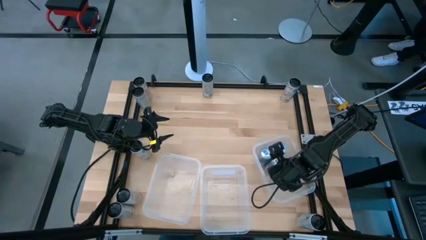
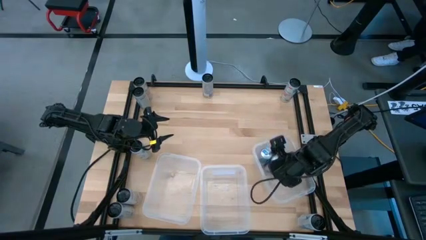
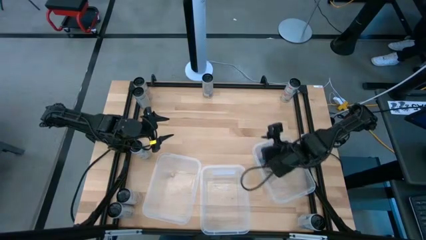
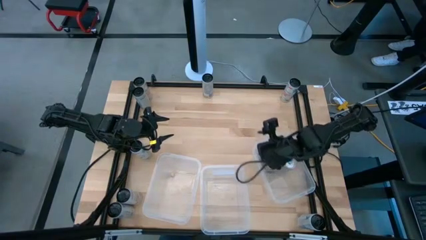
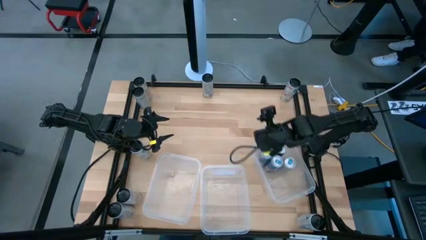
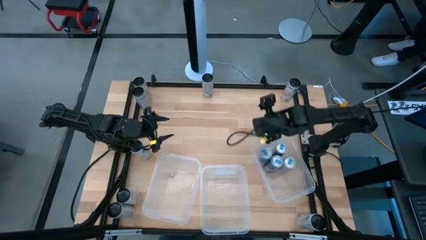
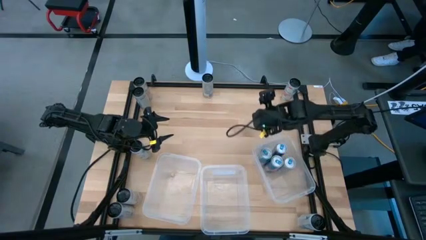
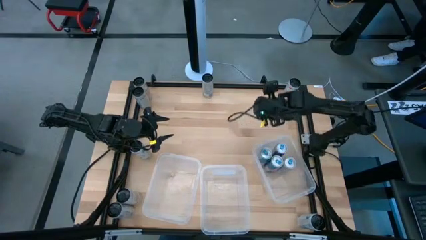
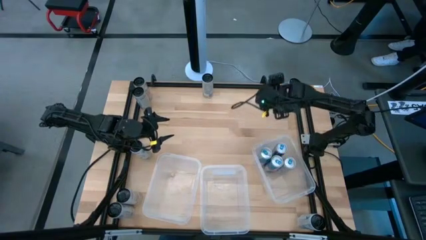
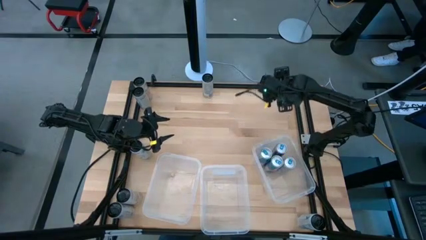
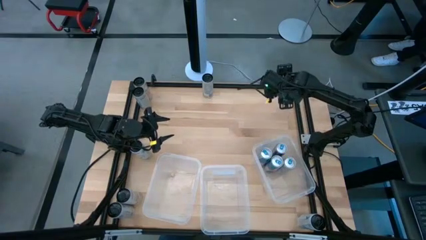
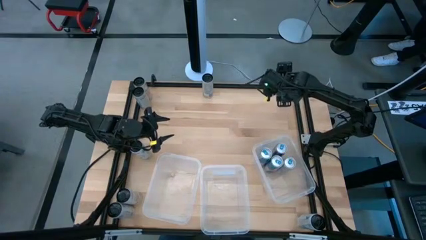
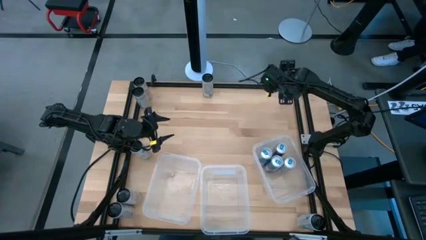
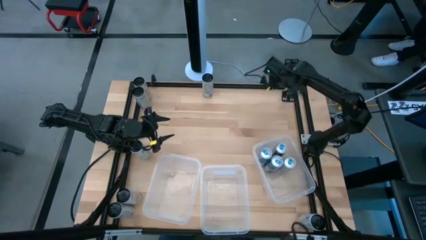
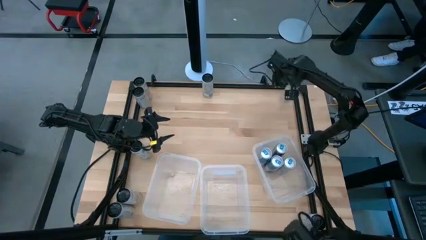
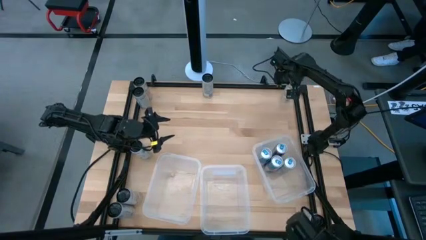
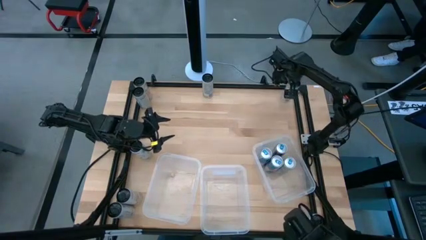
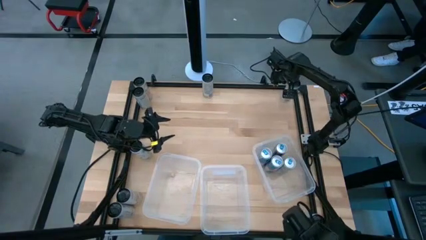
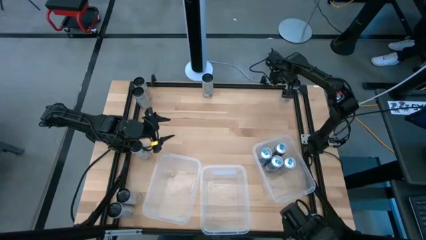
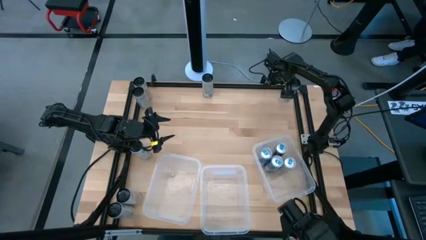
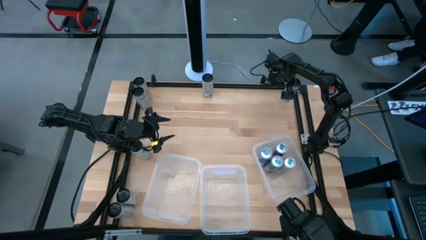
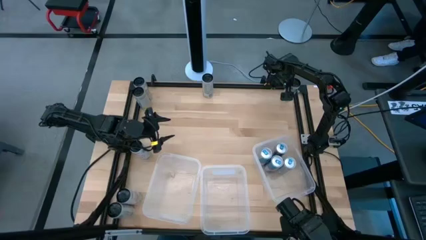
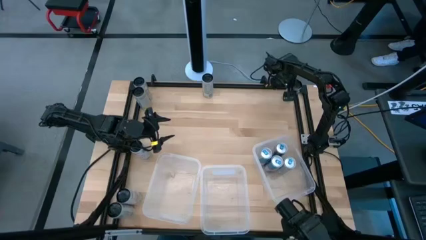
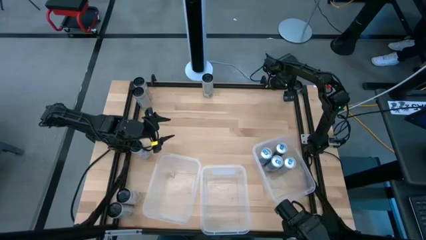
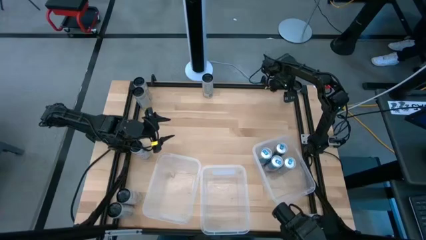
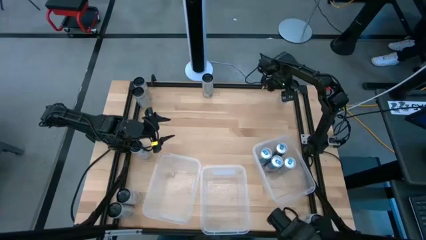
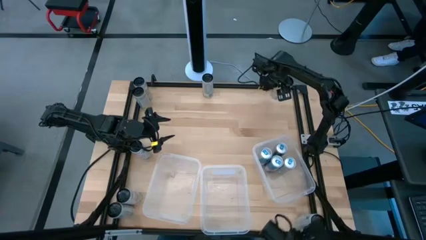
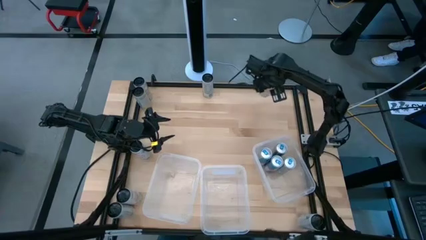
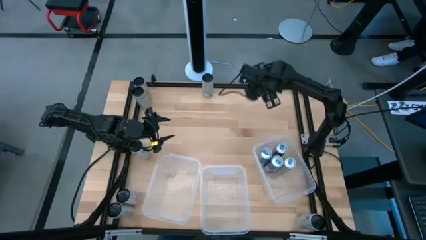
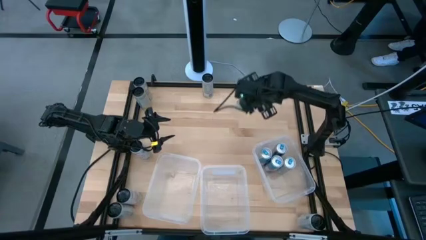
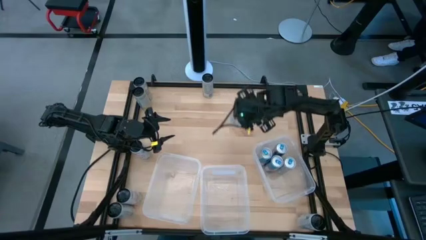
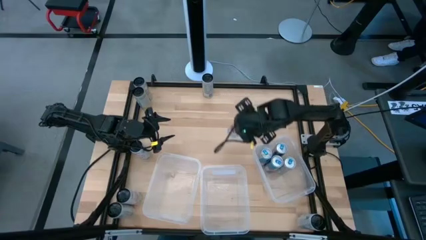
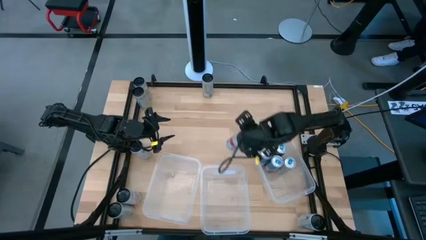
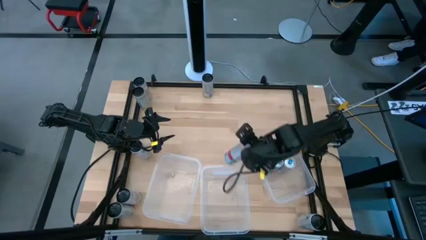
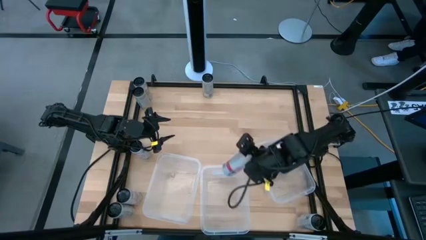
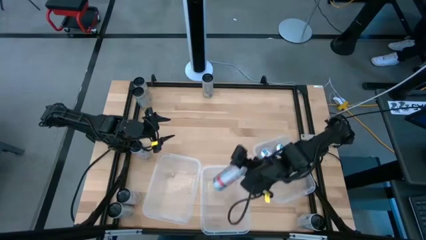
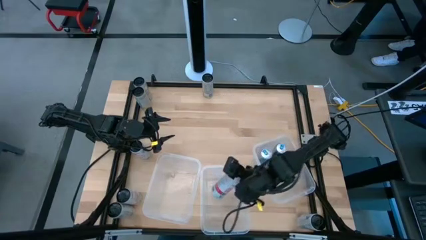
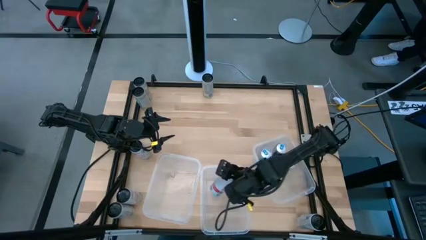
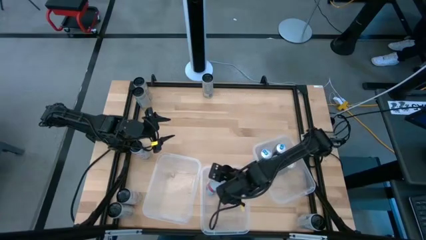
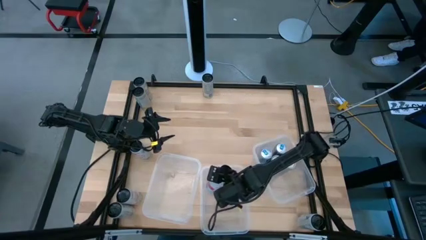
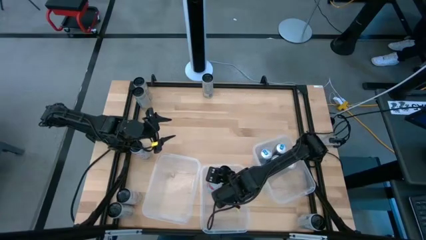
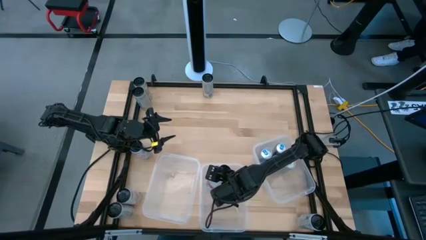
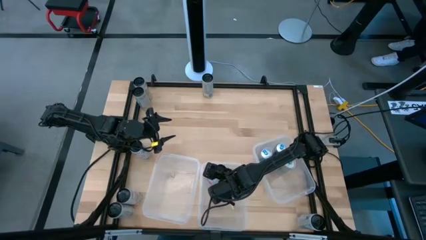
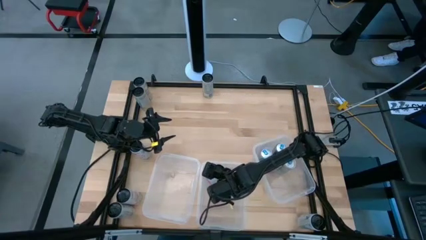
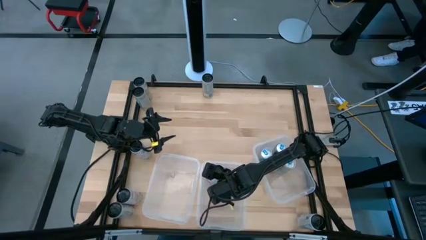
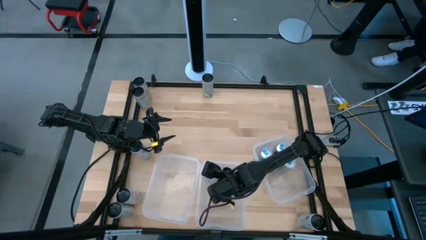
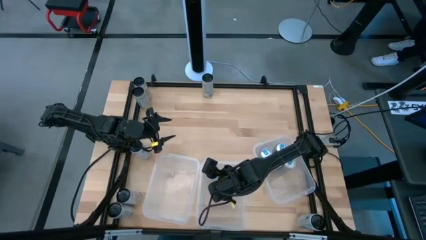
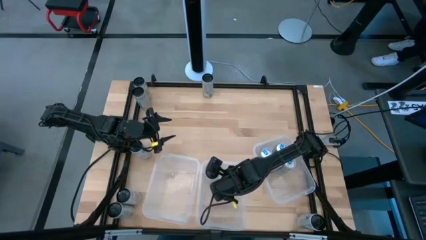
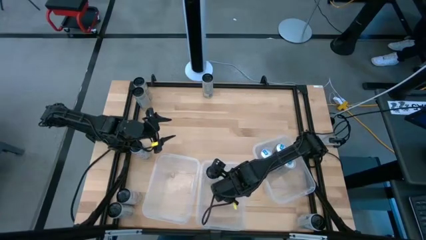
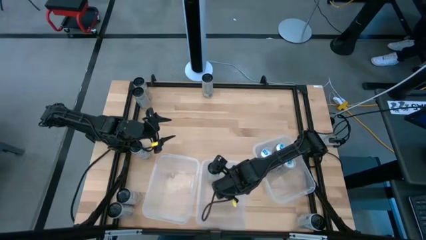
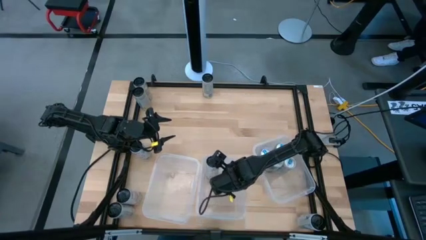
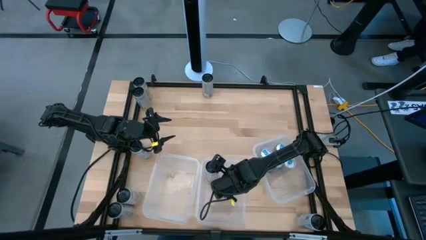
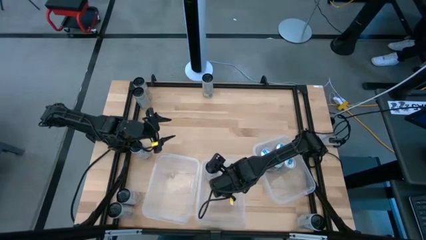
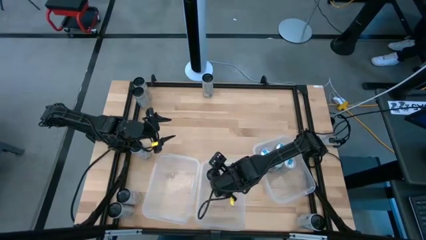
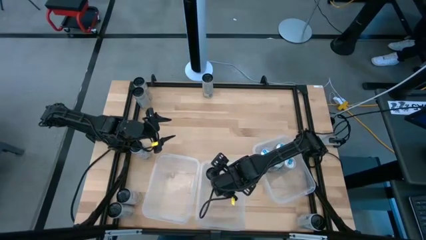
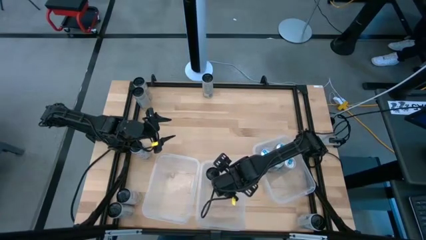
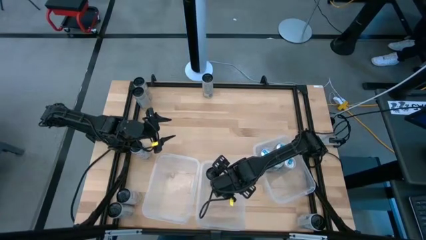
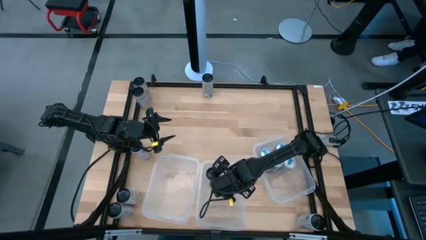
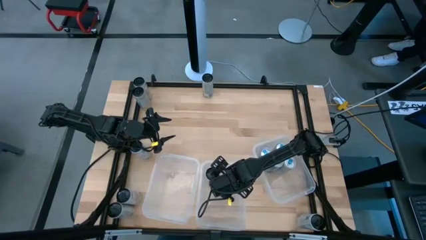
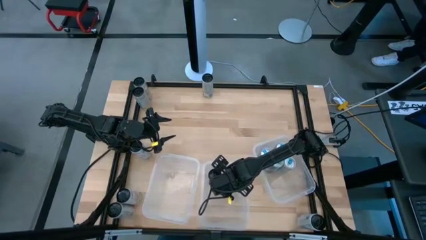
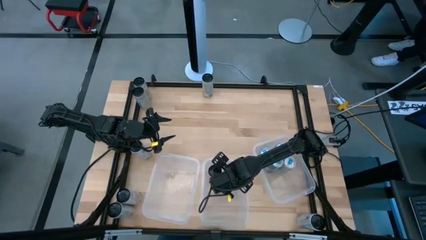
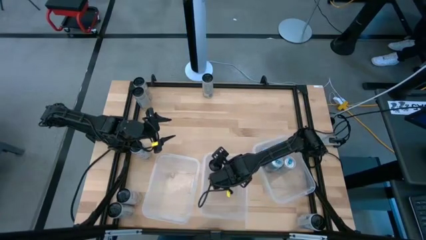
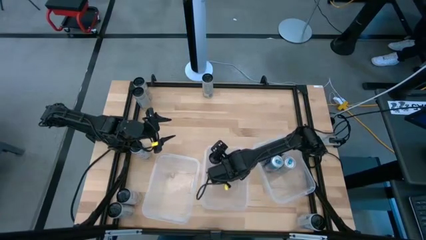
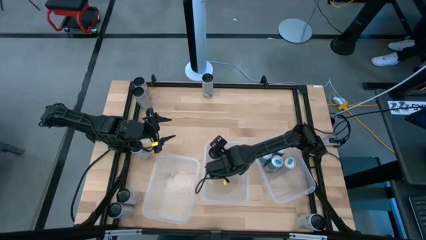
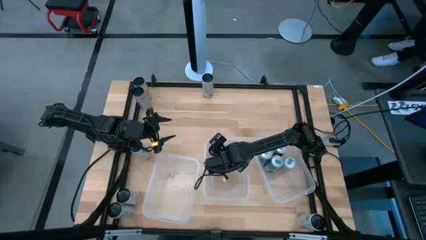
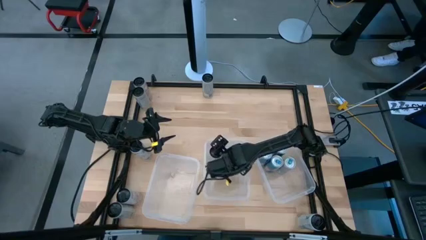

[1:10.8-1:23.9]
Task: Sort soda cans
Put the top white-pink soda can into the middle transparent bin
